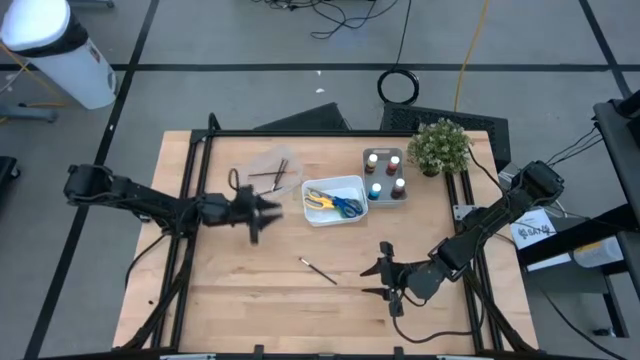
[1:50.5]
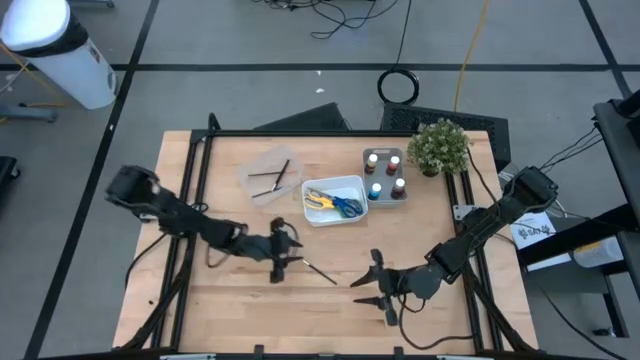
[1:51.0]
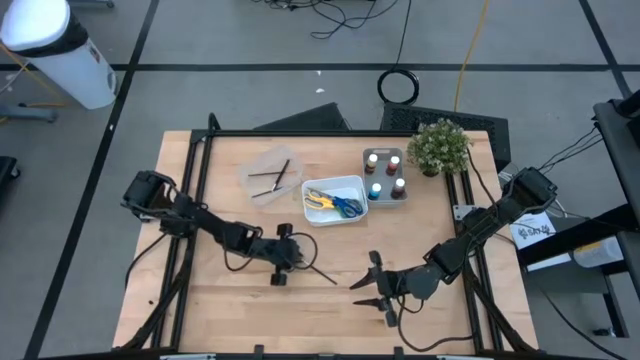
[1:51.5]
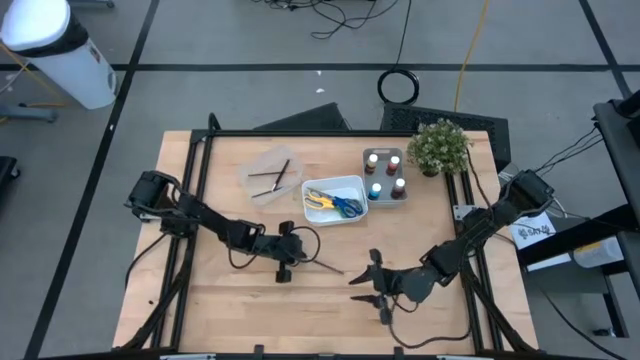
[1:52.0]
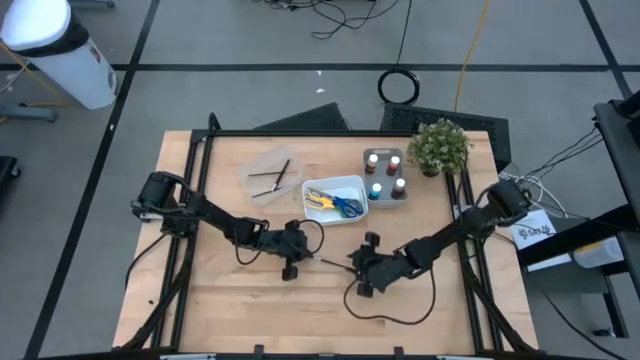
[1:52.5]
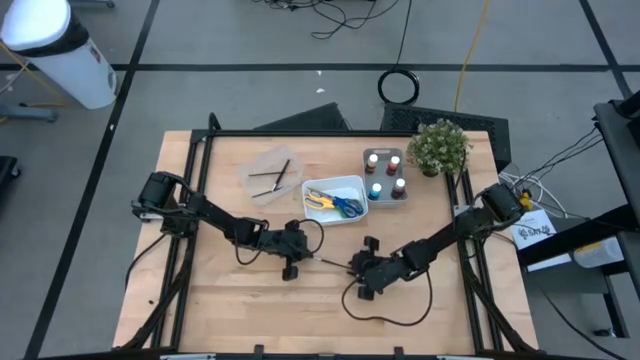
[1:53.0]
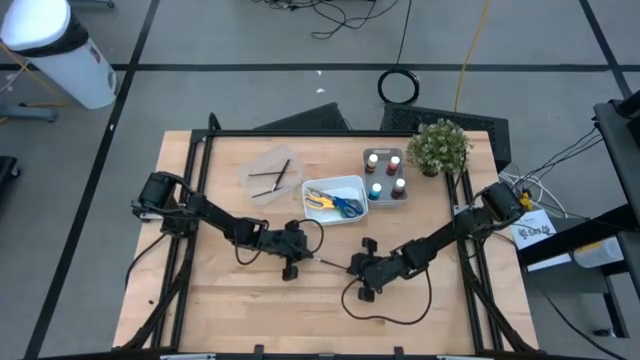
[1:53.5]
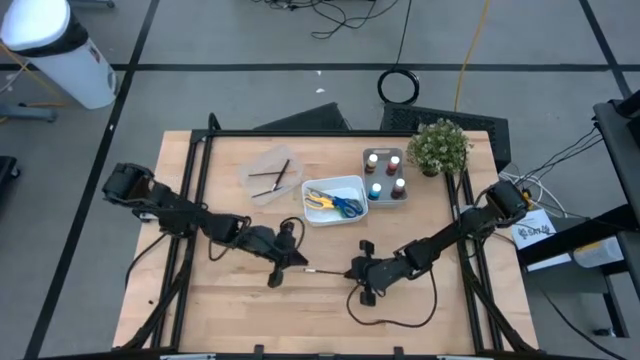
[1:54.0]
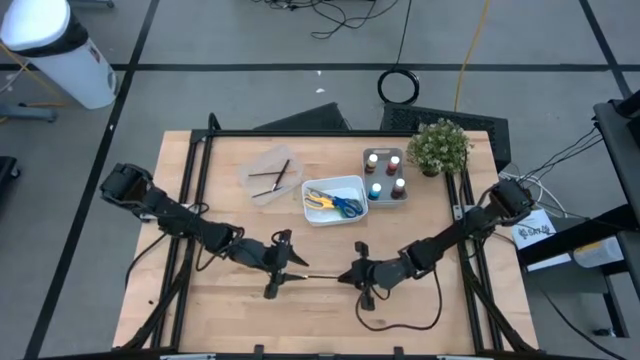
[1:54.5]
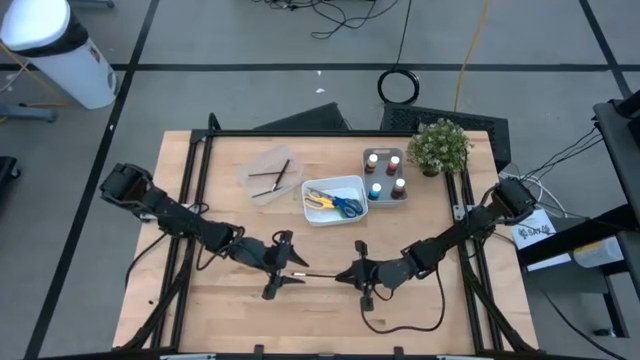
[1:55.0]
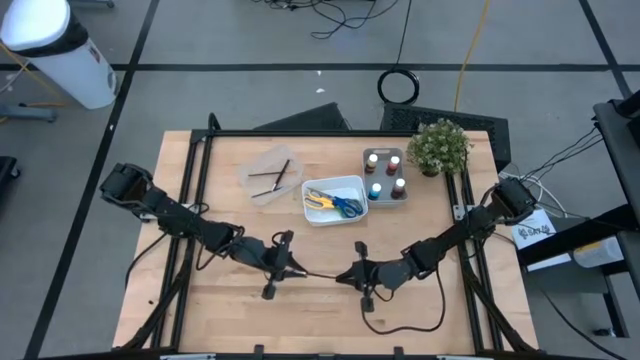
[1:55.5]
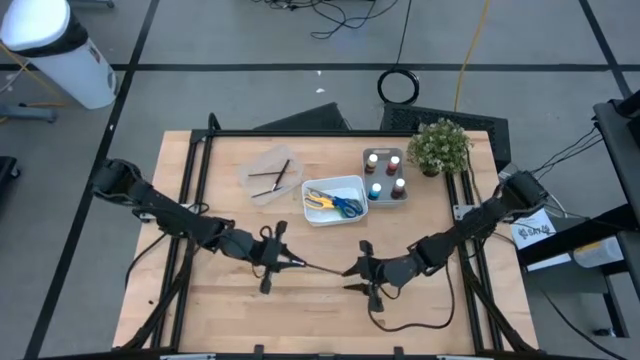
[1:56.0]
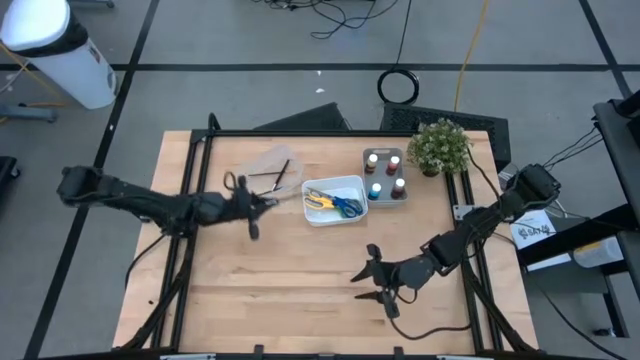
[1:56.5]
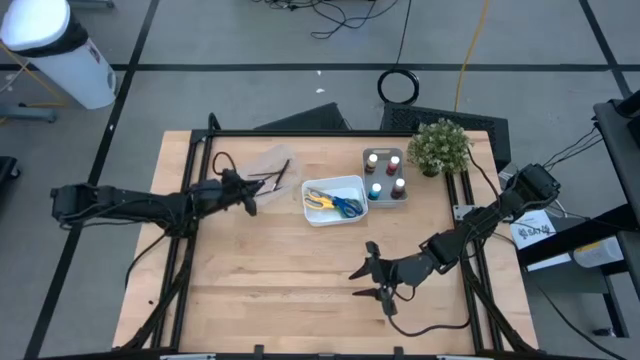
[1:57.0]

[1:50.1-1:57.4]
Task: Pick & Place Paint Supplies
Put the silver paint brush in the transparent bin

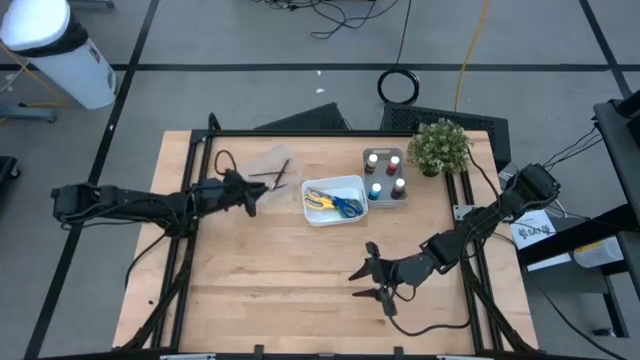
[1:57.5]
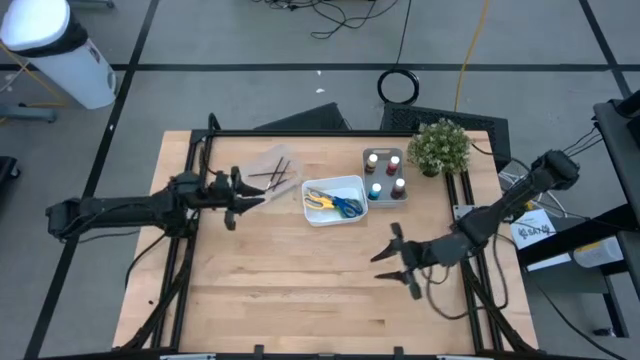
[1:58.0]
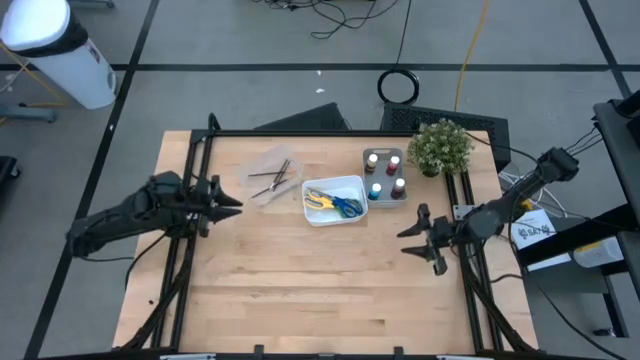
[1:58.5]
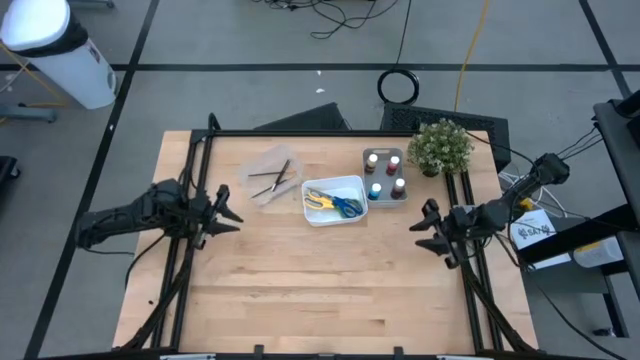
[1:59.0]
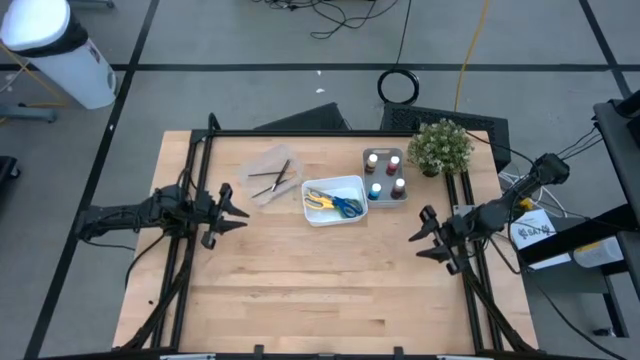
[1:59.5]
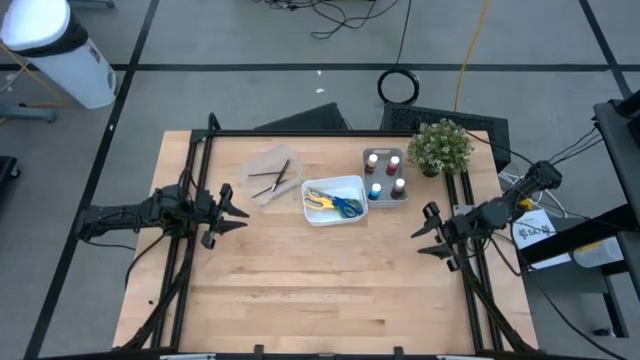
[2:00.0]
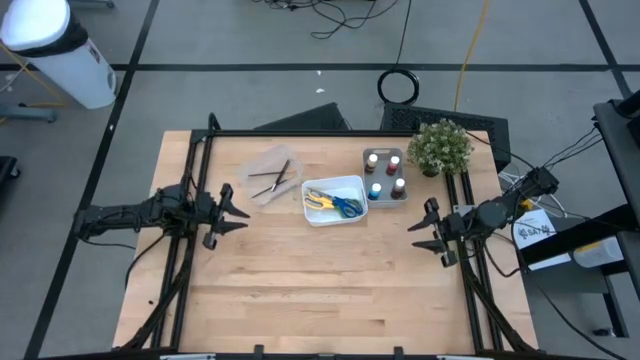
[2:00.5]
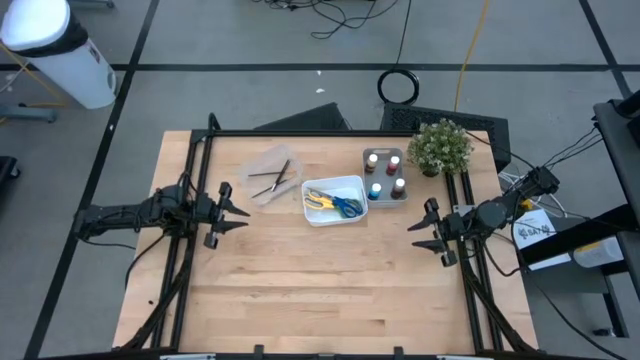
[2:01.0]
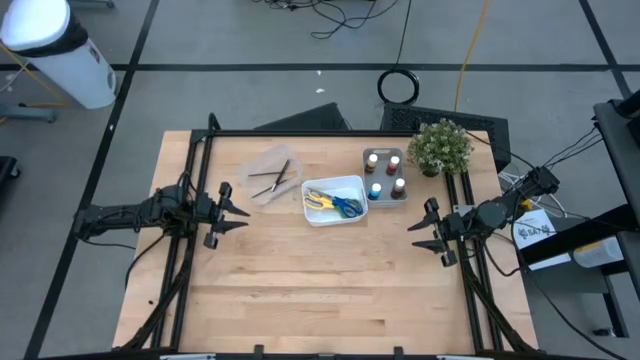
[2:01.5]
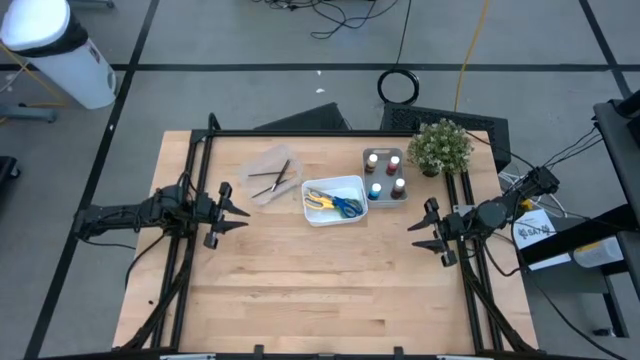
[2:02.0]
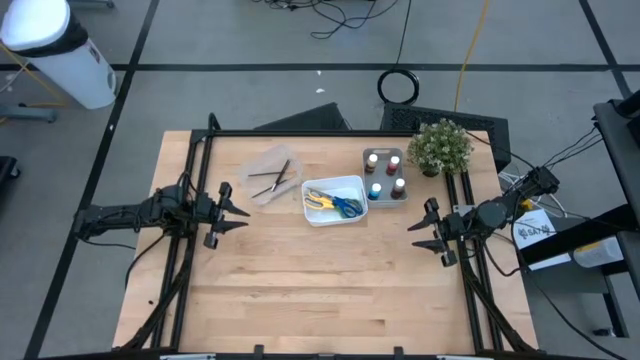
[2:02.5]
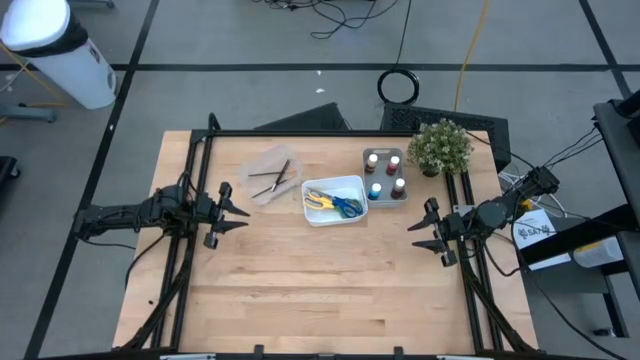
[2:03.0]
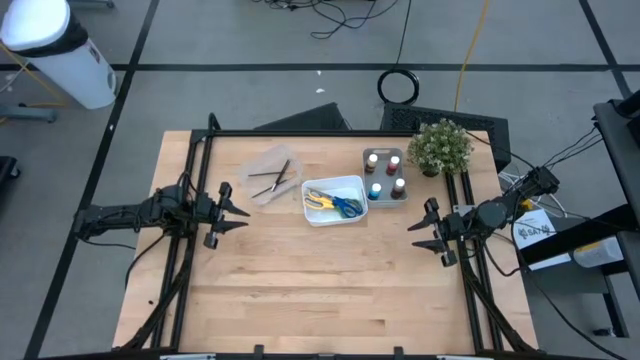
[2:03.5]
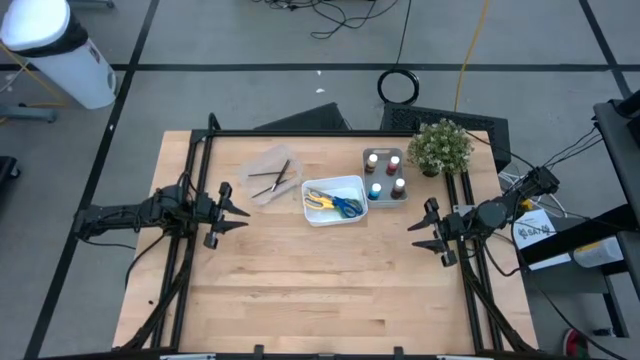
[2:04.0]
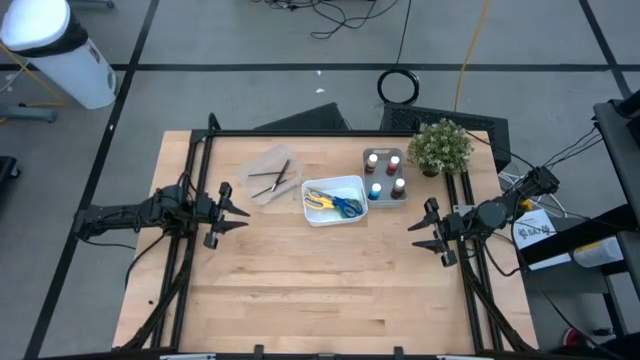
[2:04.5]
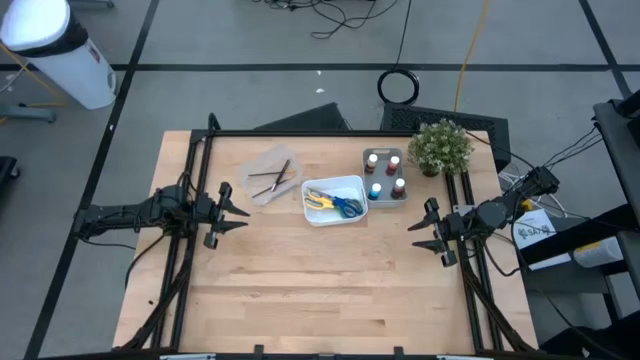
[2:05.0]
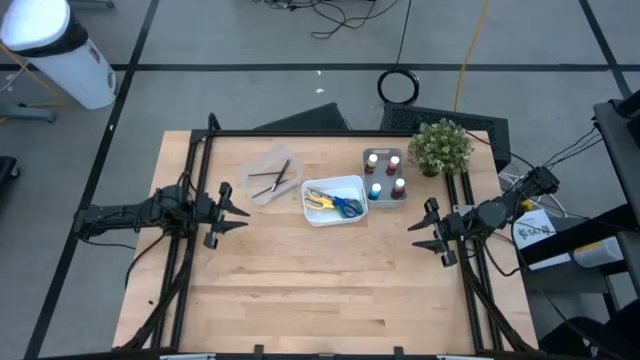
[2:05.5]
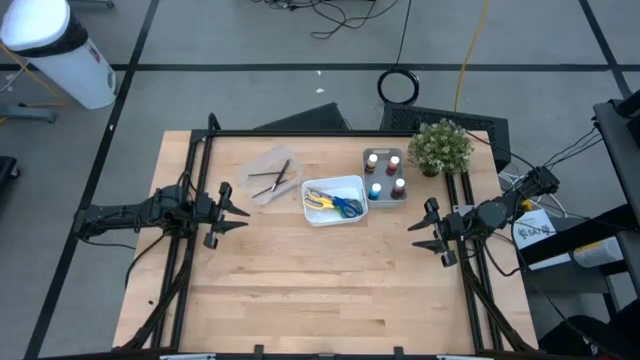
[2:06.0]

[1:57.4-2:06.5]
Return to Home Position

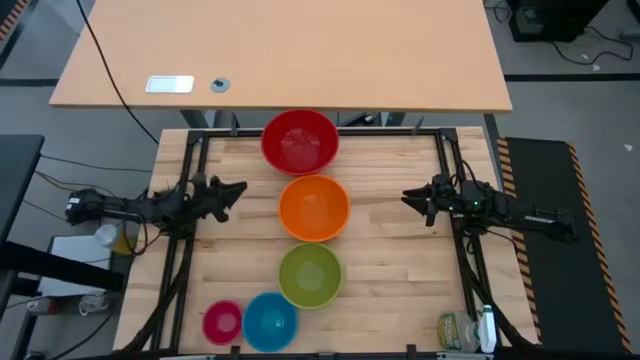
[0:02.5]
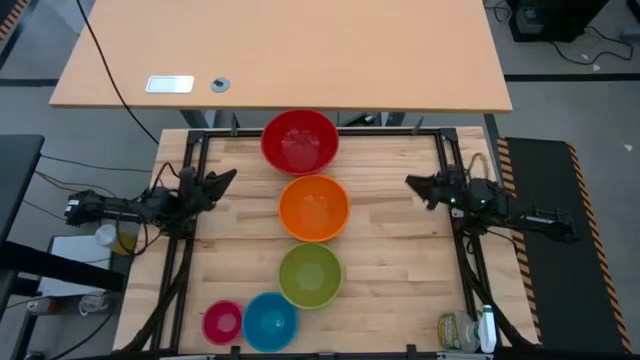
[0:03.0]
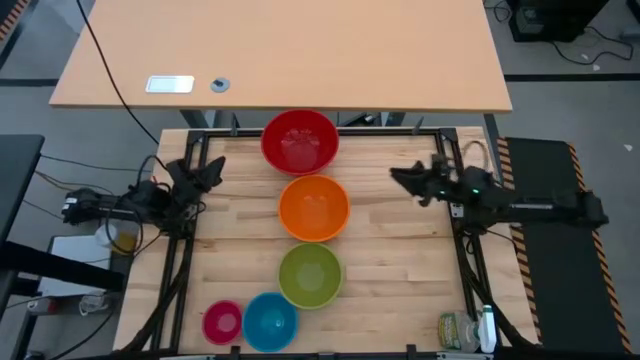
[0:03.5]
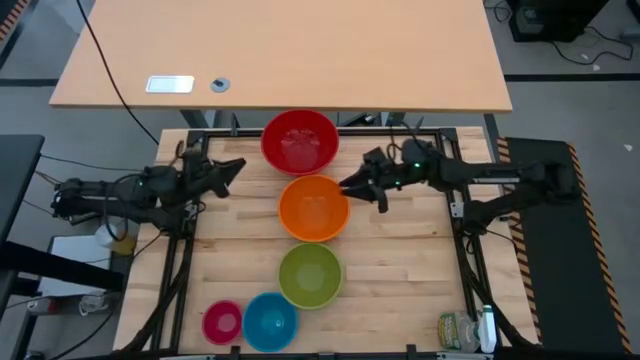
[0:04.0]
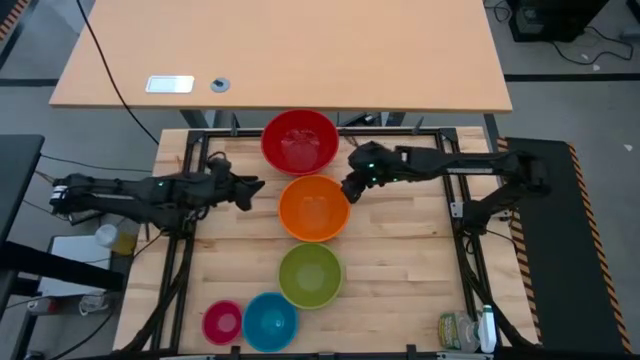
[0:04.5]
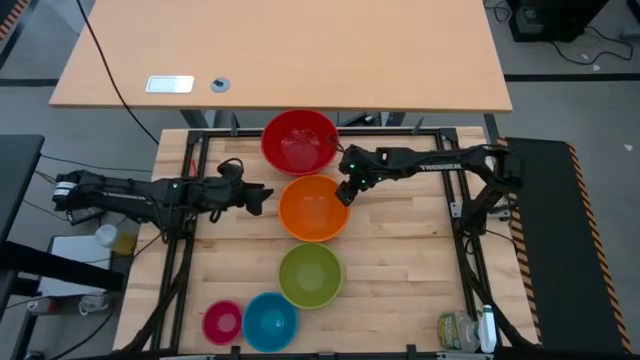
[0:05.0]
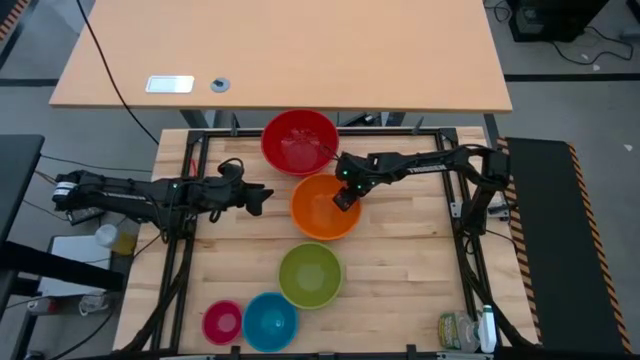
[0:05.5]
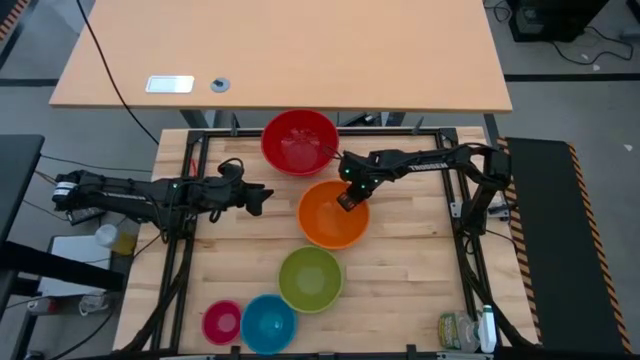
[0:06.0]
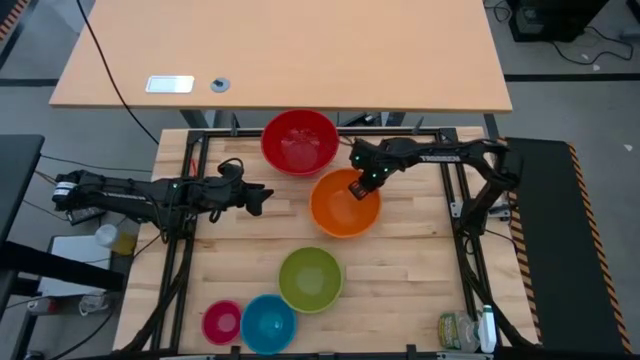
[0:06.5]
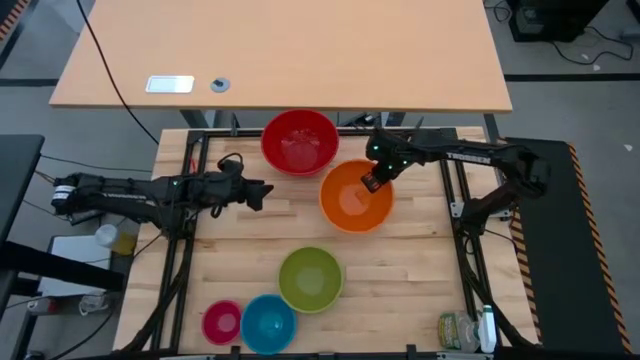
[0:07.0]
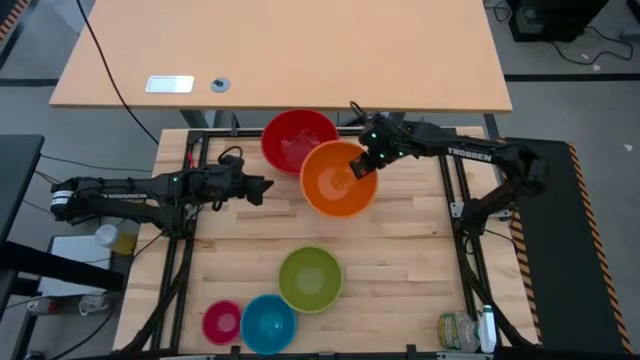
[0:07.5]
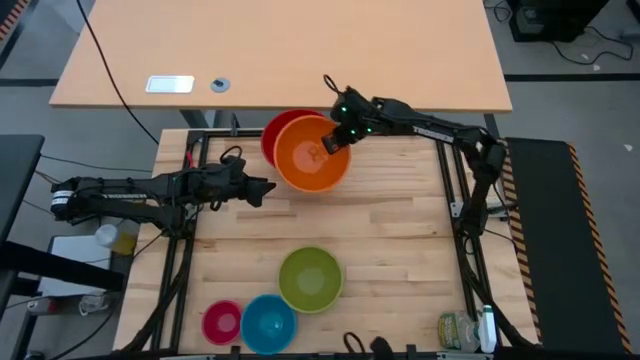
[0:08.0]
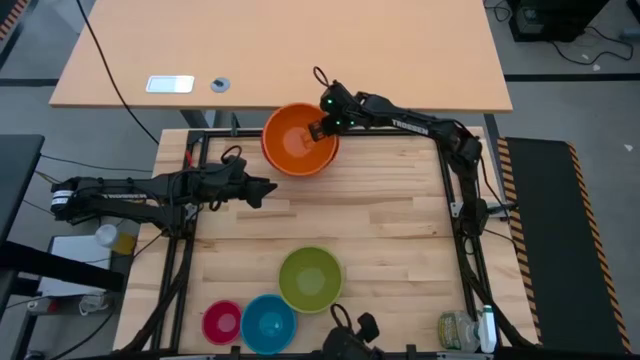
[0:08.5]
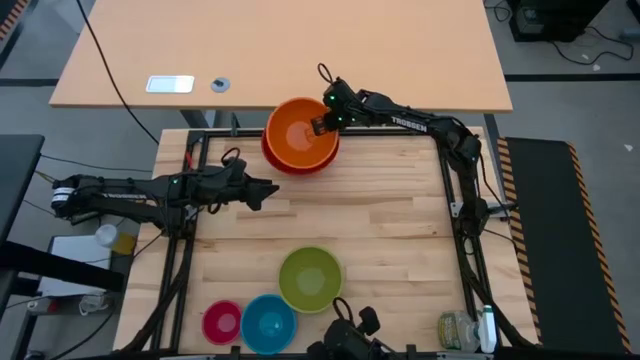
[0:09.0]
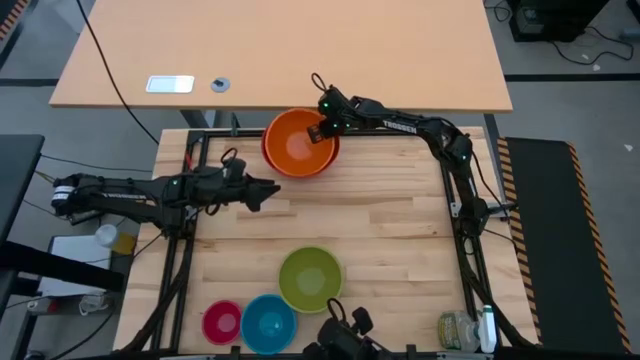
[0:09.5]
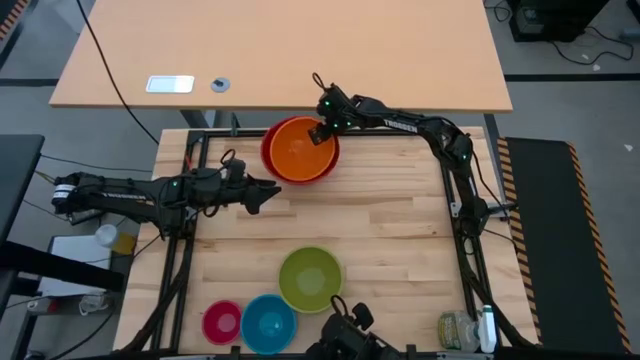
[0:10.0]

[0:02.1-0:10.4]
Task: Nest bowls inside each other by size order
Stack the orange bowl on the red bowl
